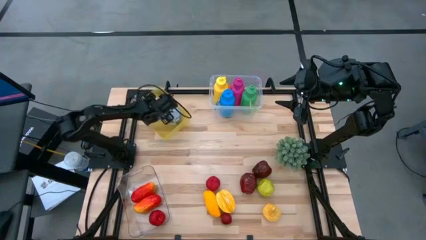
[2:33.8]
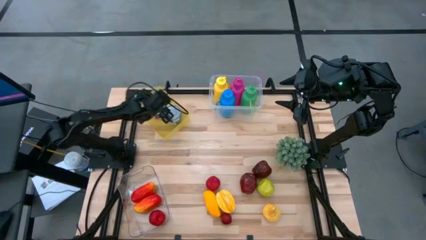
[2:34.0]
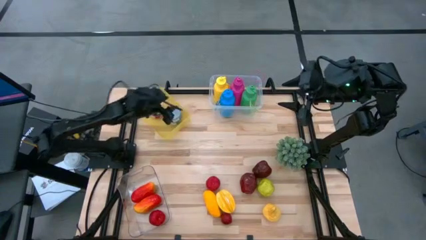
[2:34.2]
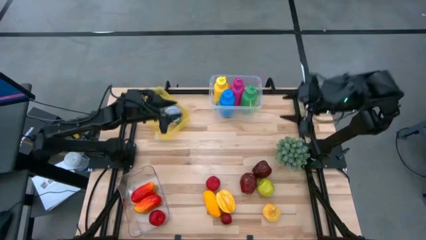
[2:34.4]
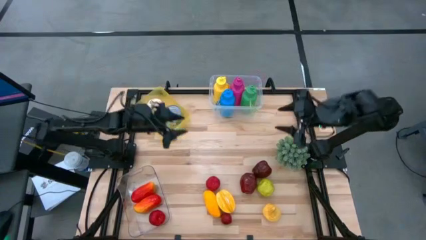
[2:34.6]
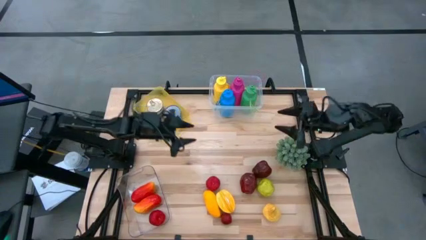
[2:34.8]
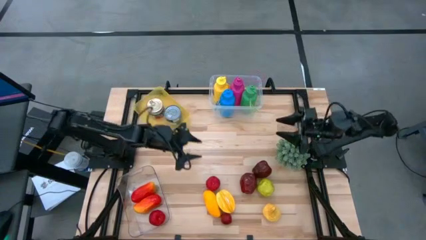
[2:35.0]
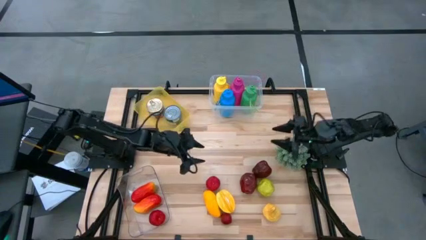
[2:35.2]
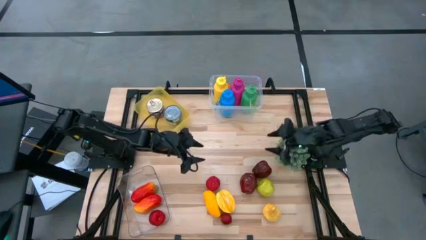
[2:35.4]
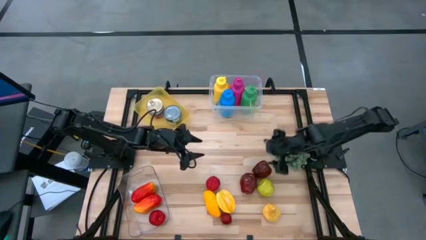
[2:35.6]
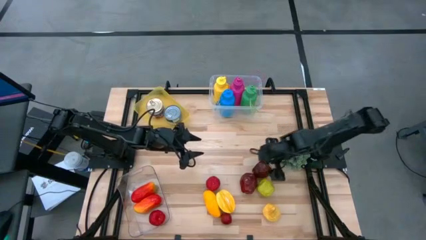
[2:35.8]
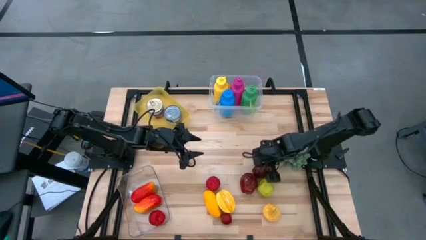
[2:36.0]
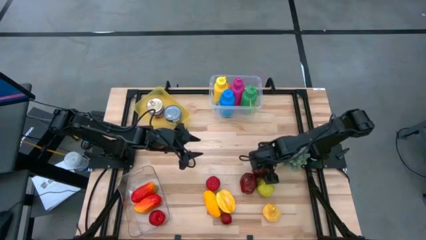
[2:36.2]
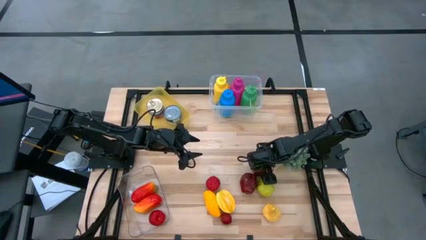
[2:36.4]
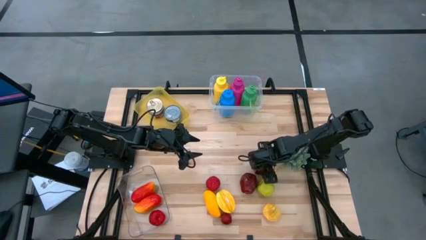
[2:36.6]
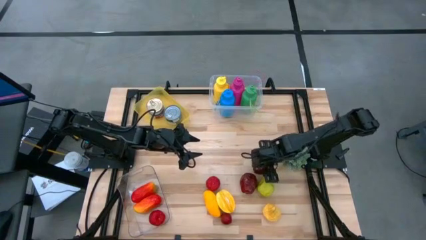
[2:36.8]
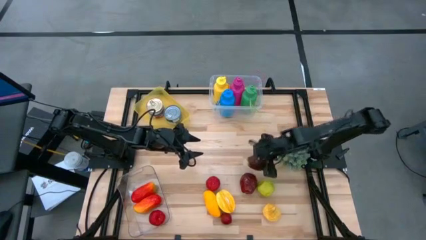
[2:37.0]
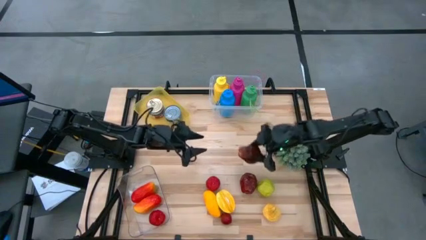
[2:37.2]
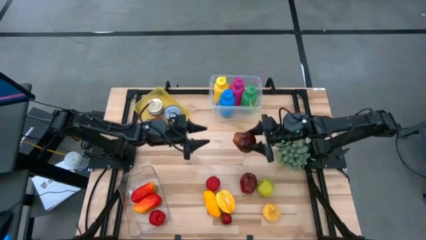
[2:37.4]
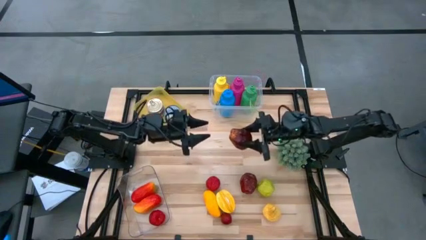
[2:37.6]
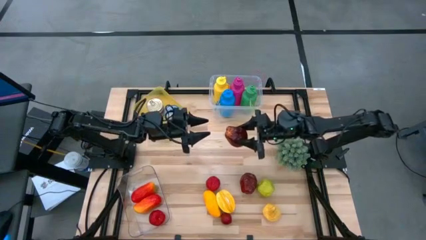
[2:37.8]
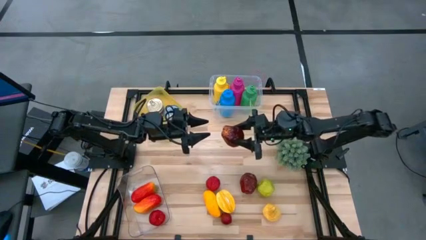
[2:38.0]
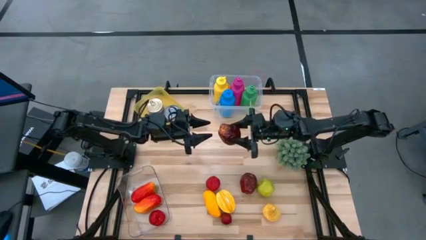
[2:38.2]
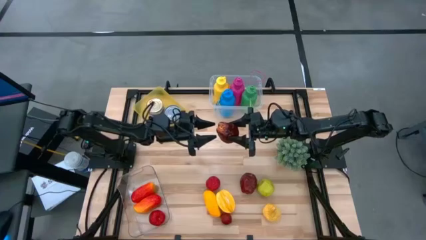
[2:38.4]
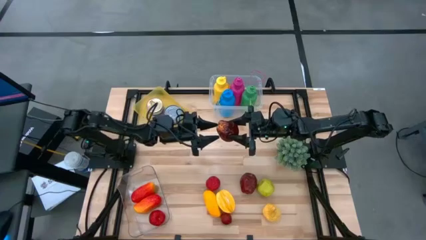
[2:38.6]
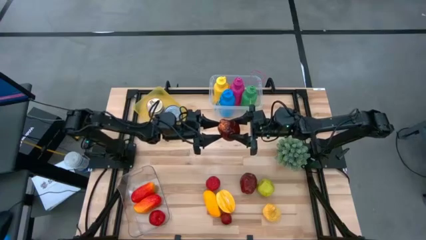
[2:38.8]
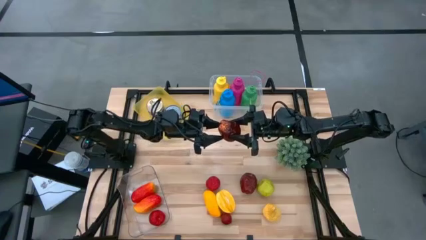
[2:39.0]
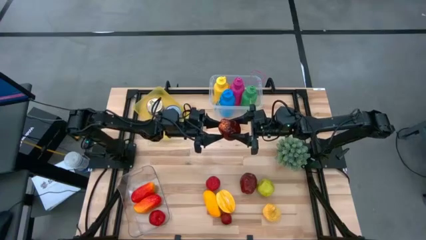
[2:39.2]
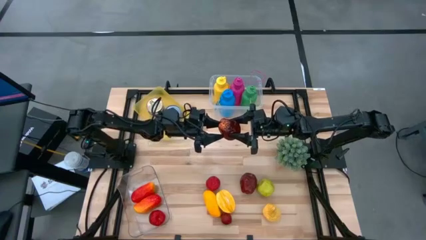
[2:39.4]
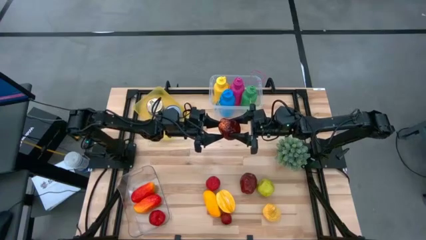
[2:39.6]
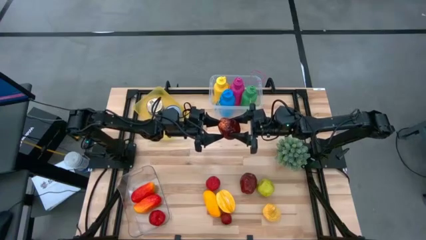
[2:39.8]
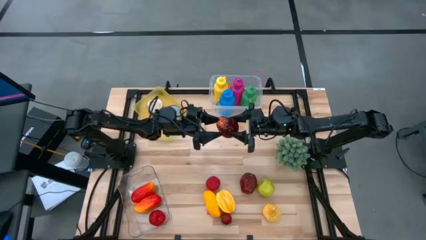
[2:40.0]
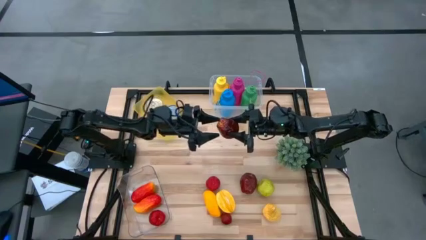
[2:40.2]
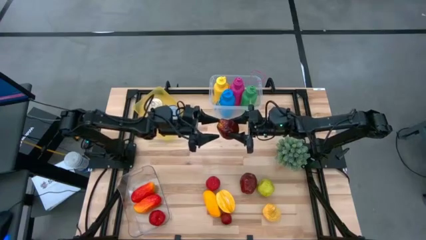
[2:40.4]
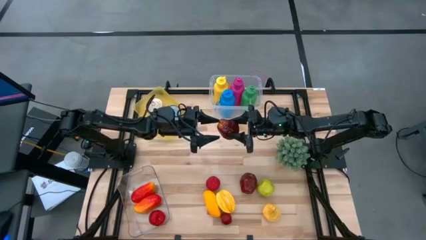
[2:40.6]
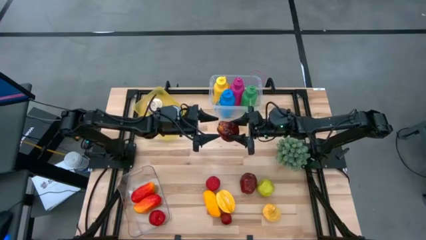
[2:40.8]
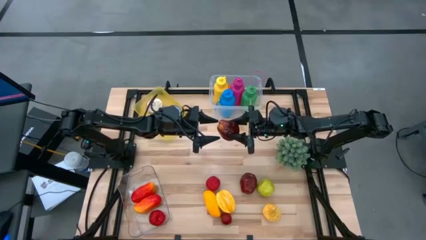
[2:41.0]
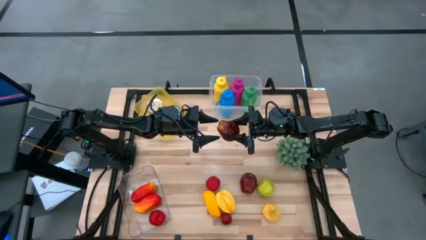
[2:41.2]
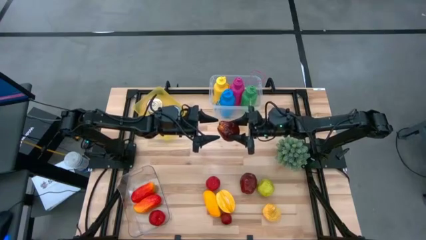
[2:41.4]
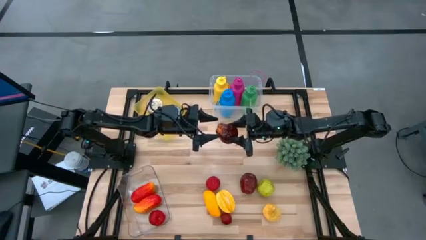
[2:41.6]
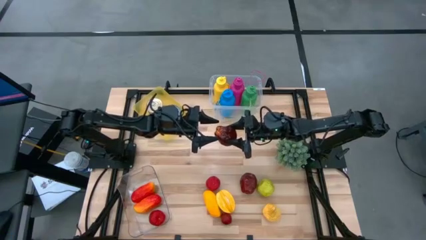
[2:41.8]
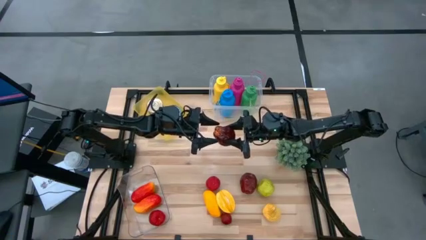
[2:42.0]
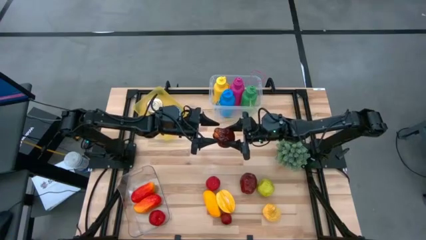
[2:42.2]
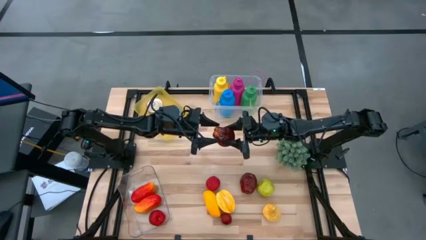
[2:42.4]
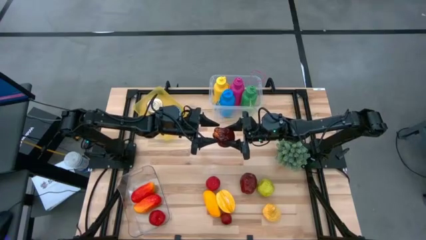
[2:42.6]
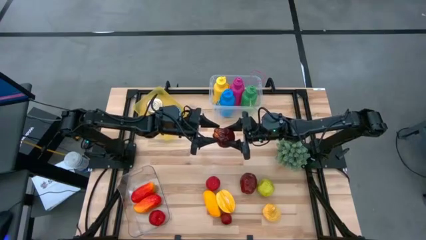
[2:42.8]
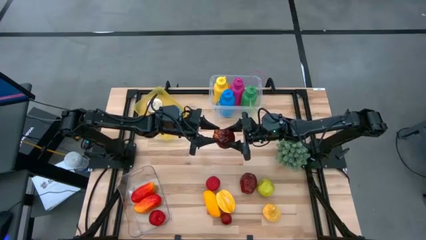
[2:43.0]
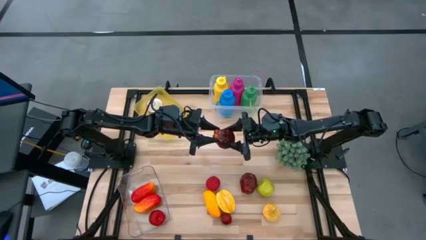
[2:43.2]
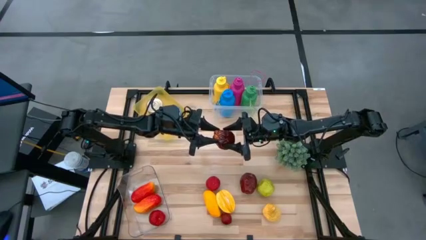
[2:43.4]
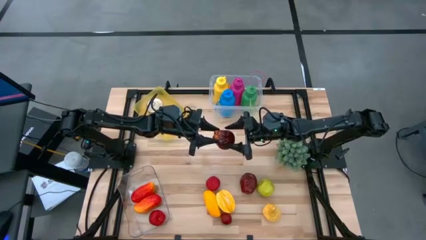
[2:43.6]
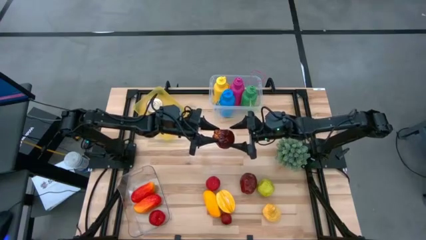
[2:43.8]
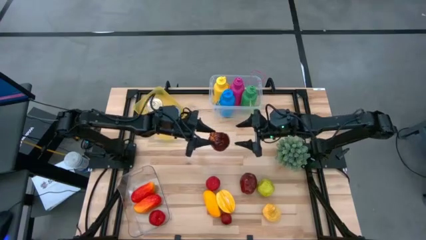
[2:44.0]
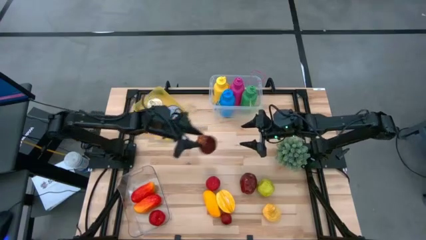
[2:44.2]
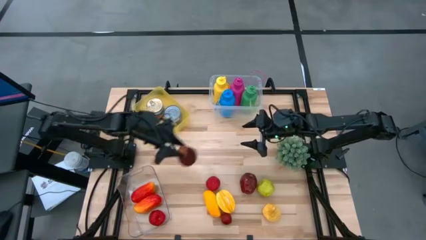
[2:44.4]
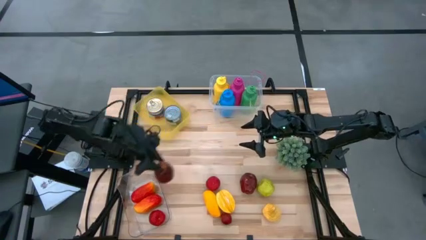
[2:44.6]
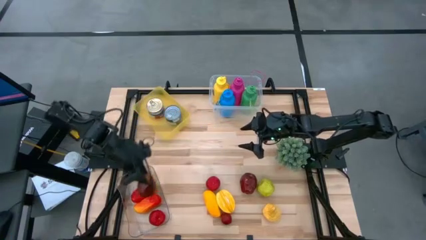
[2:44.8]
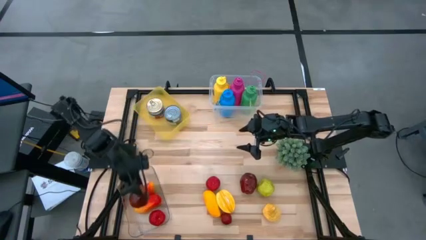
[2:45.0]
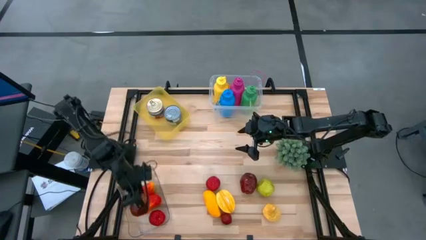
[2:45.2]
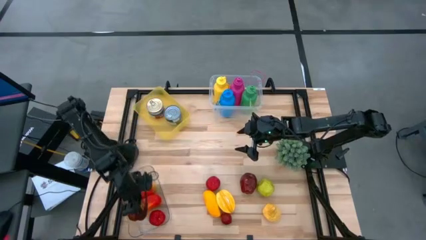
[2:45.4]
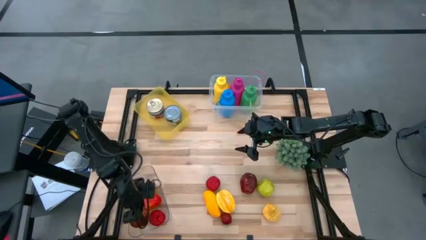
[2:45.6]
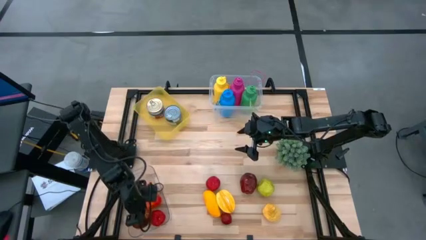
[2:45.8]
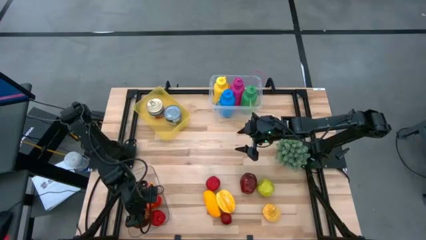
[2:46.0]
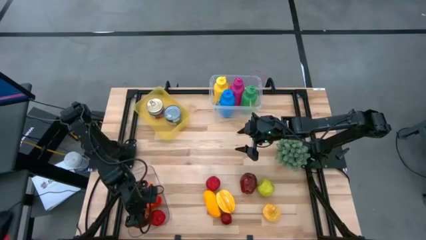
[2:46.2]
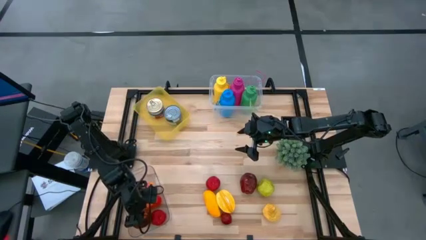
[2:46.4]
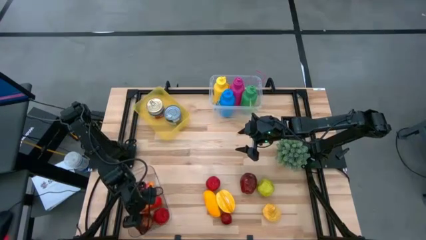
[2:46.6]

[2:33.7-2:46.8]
Task: Pick & Place Food Item
Put the right red apple into the transparent bin
